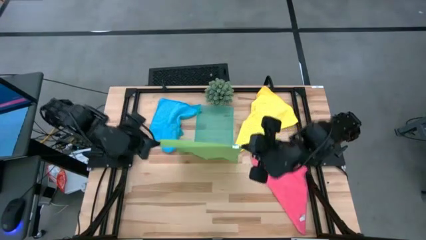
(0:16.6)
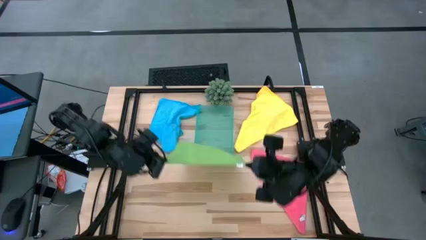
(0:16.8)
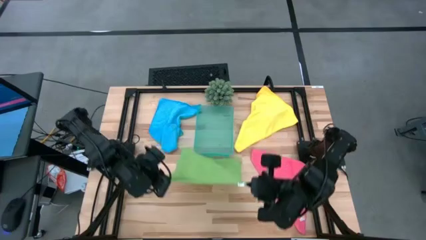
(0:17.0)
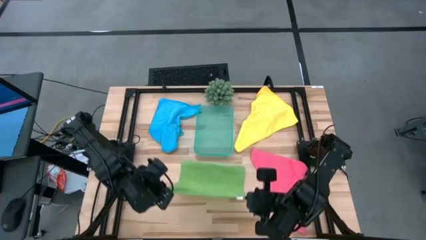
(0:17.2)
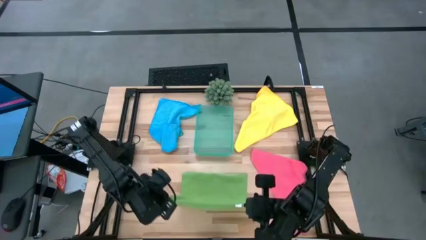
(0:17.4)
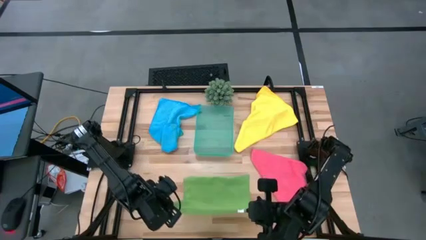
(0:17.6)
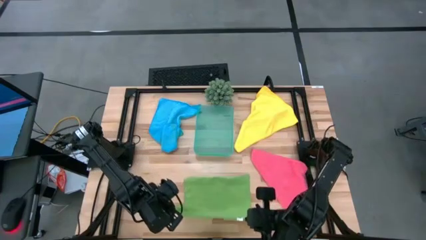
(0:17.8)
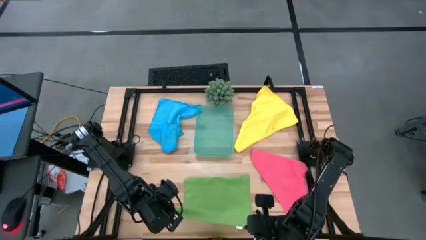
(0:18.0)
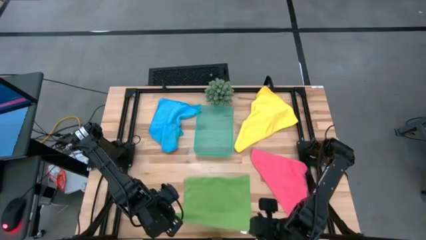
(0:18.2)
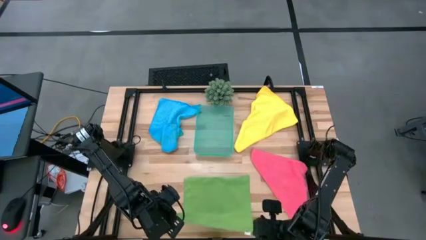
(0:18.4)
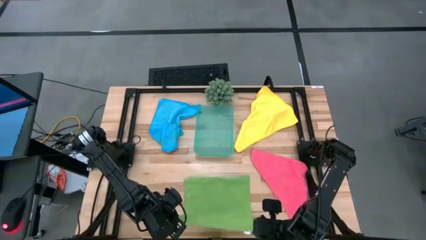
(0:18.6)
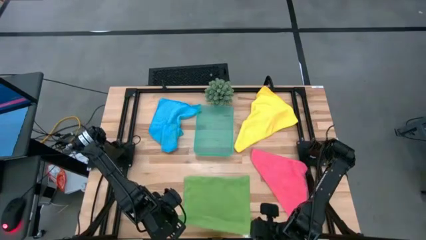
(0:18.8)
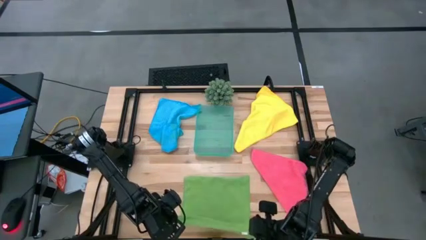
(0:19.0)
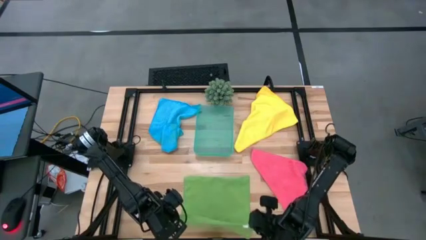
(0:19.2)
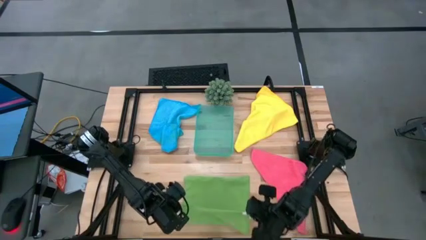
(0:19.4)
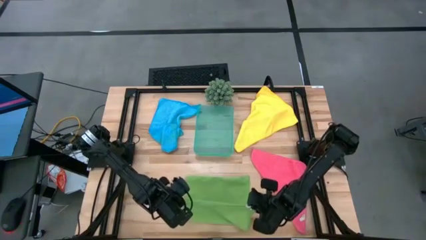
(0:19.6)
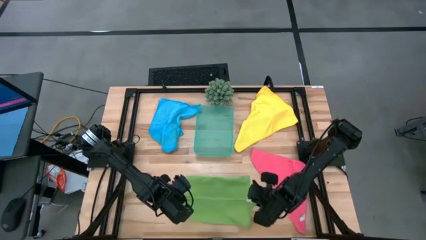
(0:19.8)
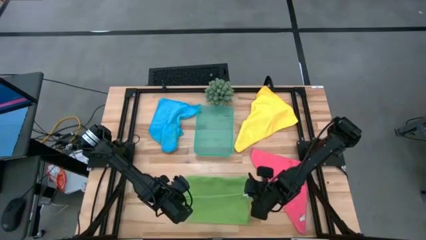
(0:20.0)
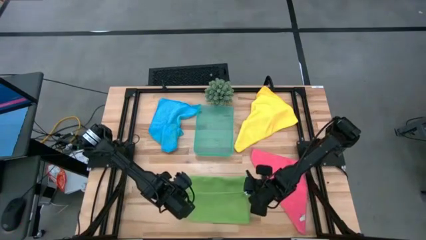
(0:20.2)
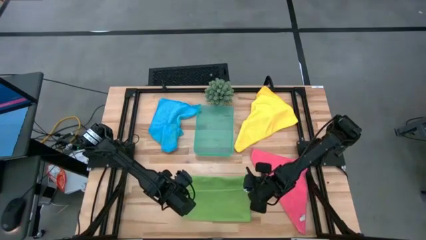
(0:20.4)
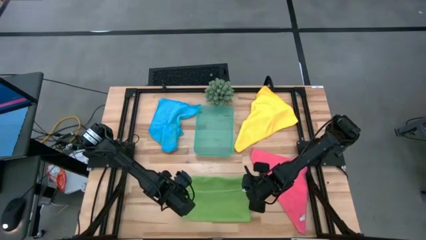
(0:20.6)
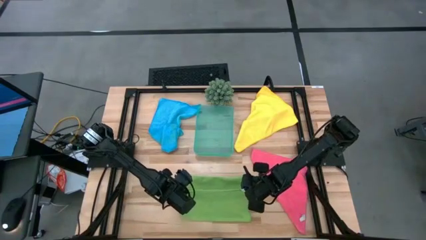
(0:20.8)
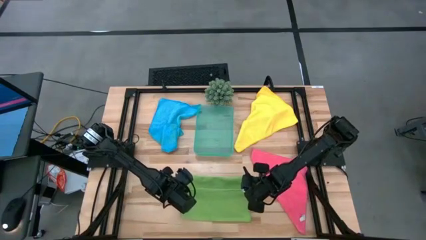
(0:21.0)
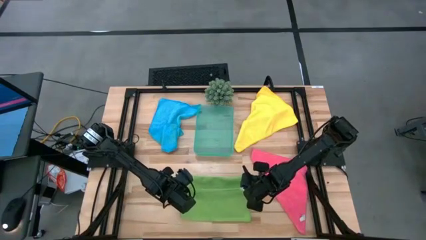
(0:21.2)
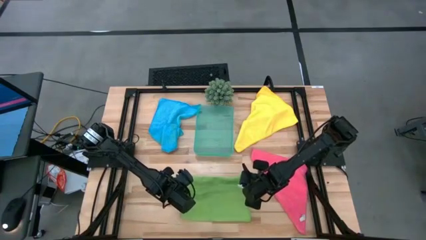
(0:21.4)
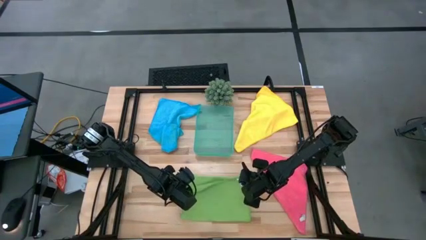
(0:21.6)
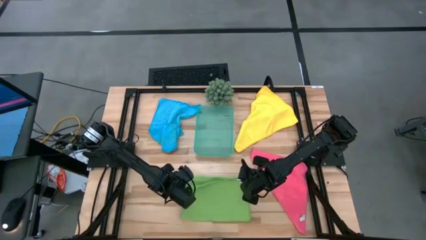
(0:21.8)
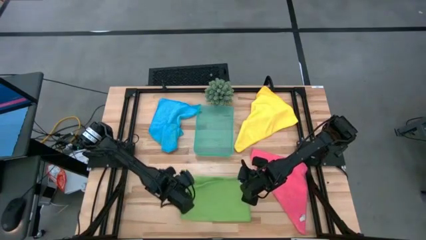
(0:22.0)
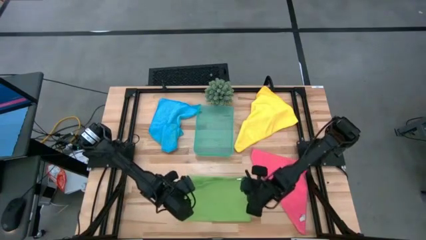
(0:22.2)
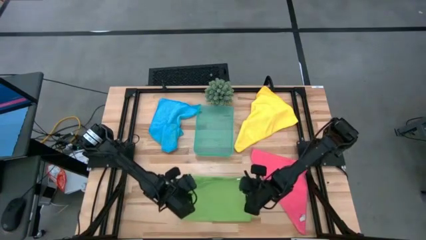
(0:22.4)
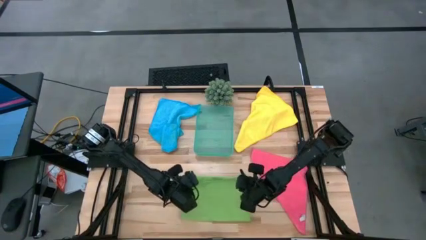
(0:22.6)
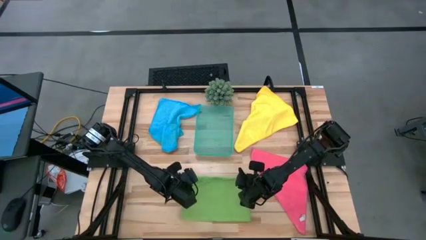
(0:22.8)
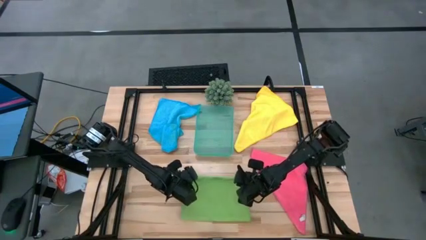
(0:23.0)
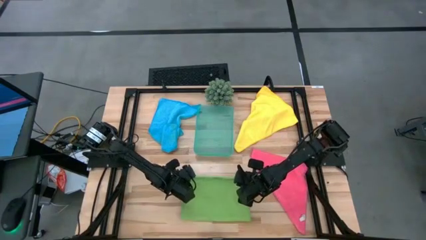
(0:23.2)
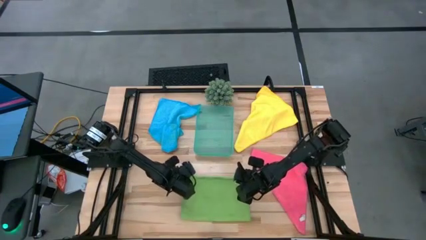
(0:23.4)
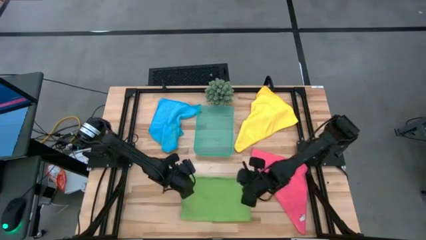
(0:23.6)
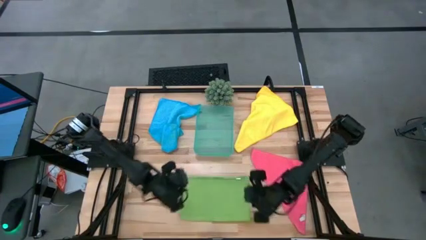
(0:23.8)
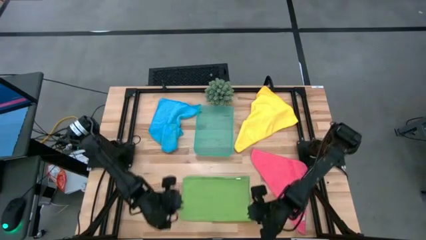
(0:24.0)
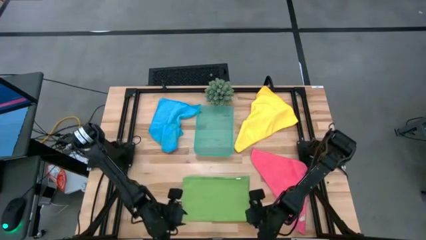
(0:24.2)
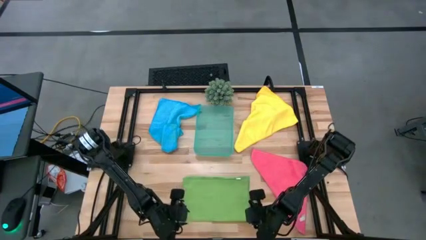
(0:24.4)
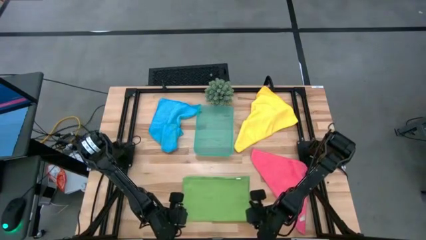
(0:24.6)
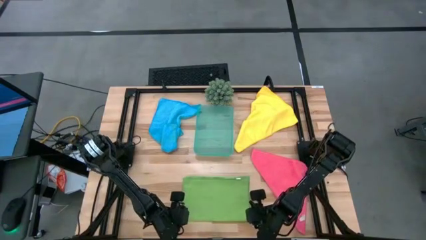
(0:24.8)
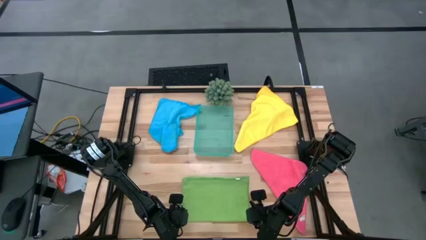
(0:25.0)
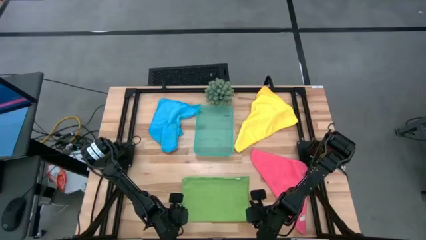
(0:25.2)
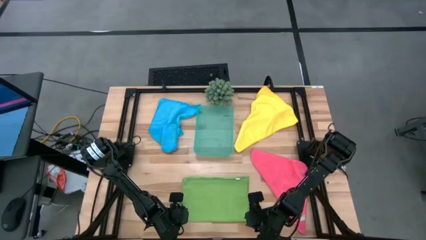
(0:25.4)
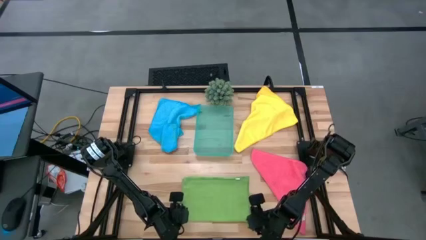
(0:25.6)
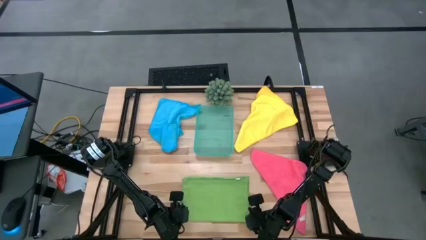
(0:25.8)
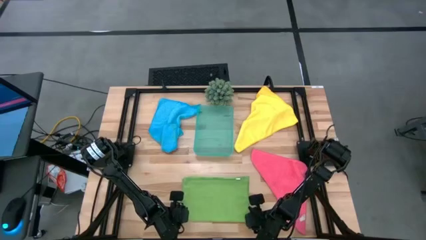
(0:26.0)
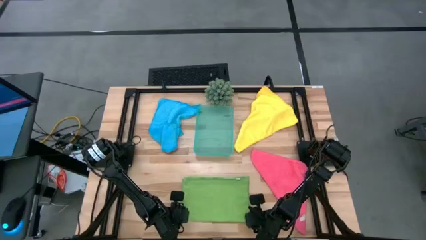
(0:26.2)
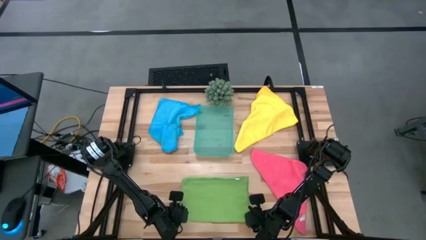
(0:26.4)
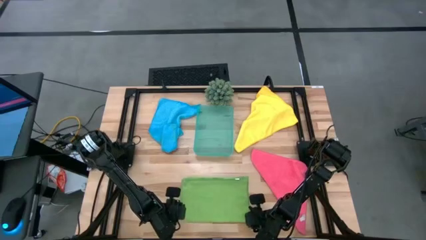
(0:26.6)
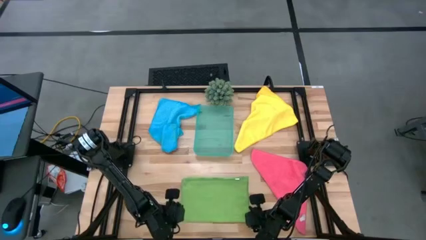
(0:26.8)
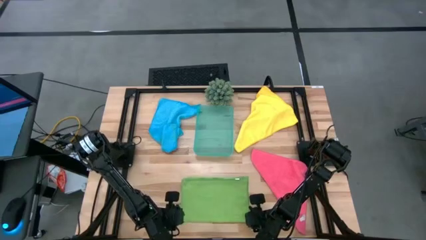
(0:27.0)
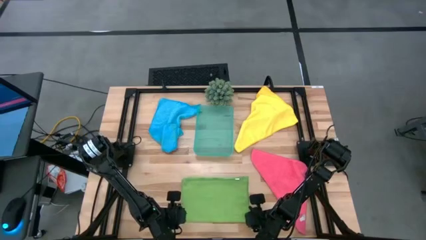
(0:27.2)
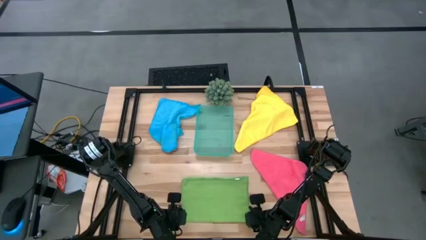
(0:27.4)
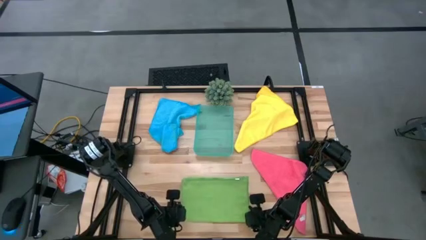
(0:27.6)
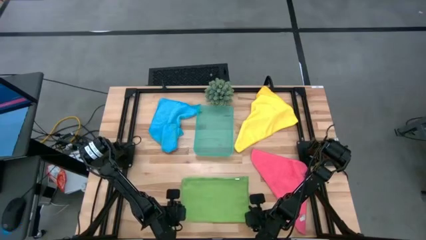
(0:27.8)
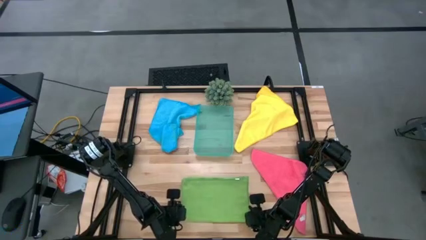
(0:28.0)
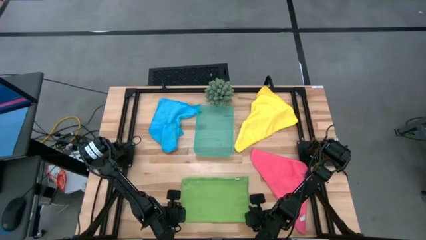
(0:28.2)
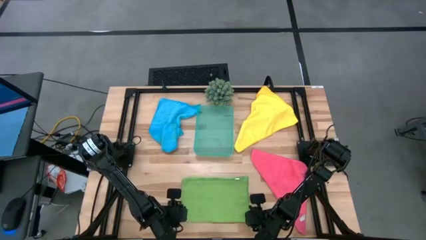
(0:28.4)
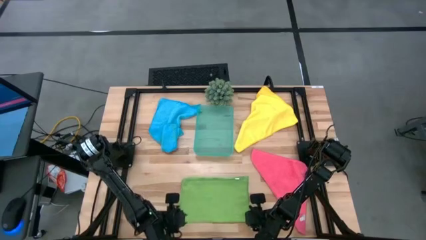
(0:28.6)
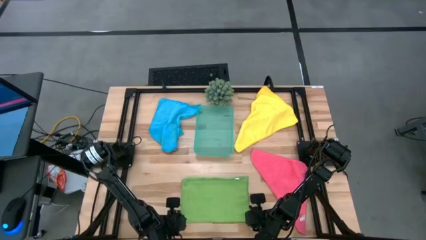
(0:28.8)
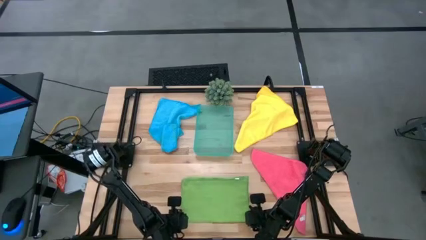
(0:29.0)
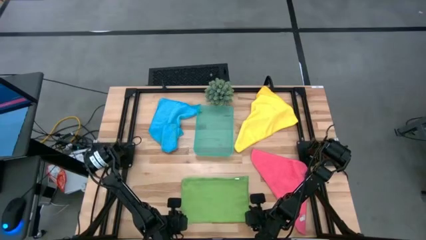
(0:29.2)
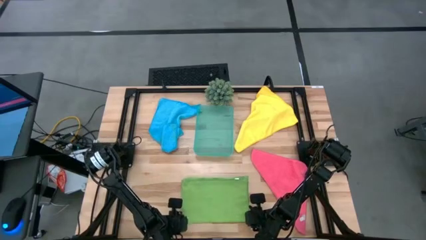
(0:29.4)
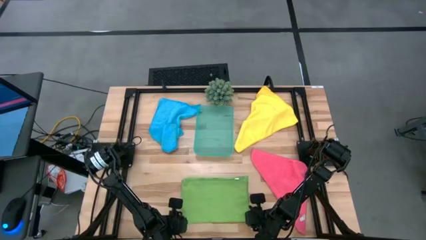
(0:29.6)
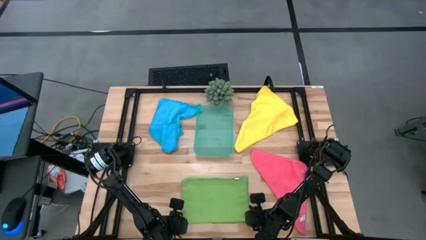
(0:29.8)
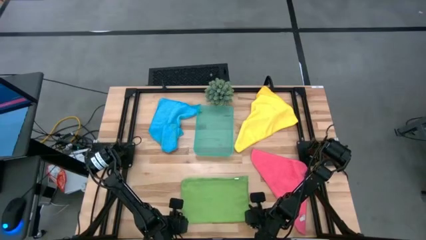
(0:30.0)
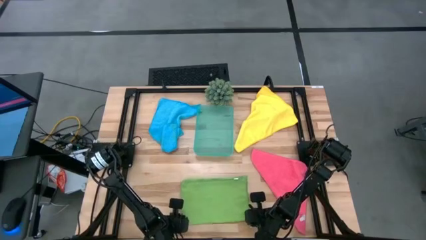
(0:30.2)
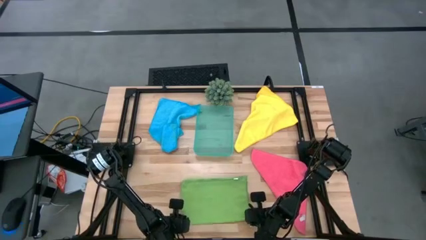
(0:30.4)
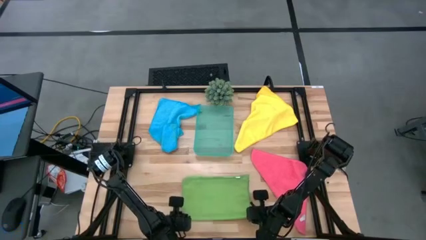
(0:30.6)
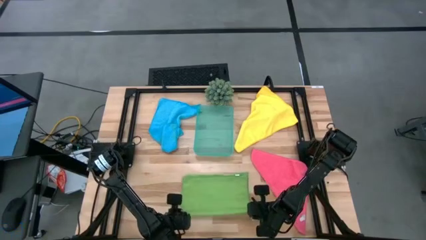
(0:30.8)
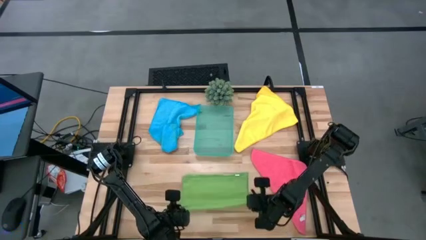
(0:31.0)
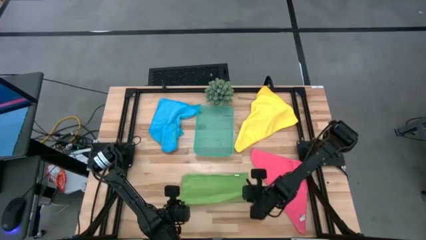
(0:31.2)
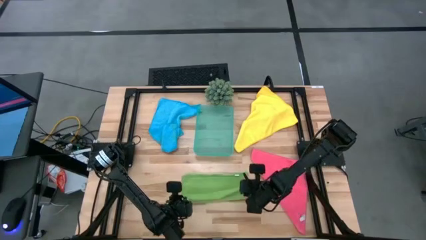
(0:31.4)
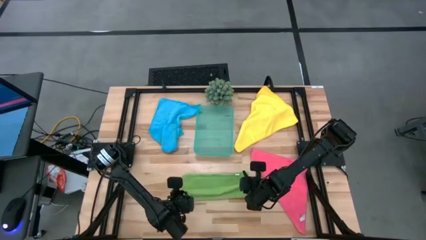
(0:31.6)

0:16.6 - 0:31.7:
Task: Fold microfiber towels
Fold the green micro fiber cloth
